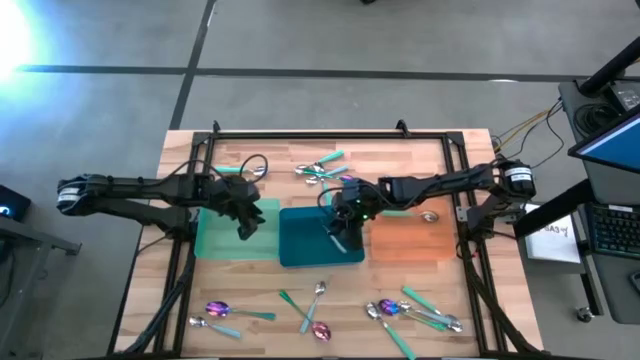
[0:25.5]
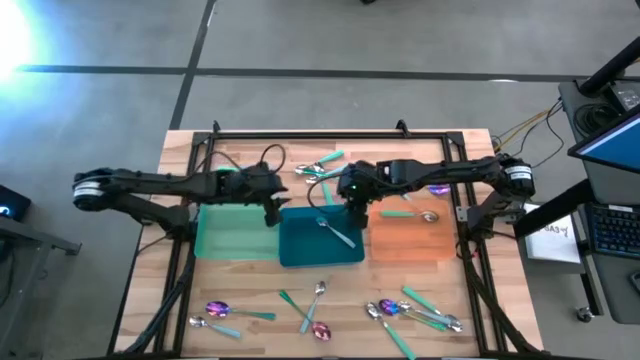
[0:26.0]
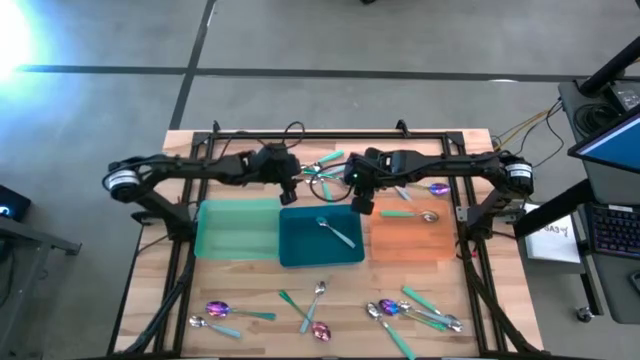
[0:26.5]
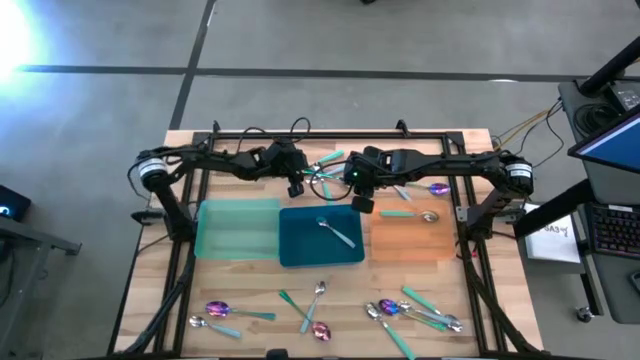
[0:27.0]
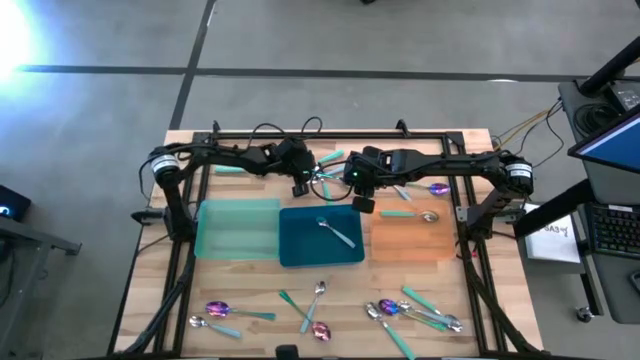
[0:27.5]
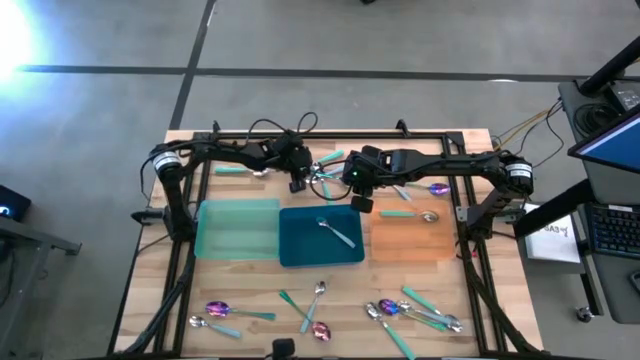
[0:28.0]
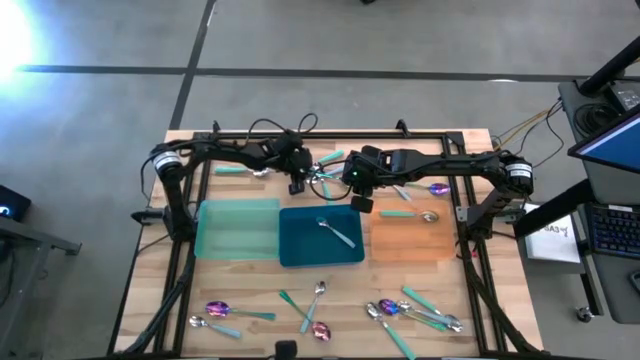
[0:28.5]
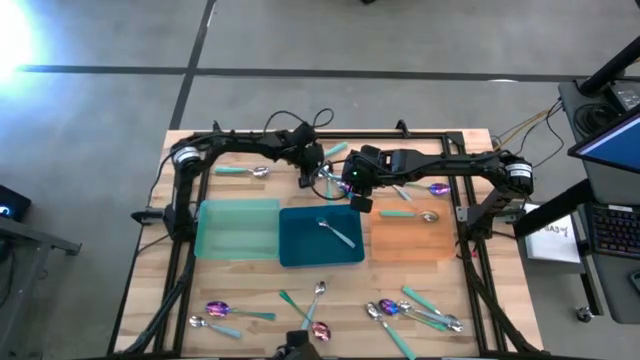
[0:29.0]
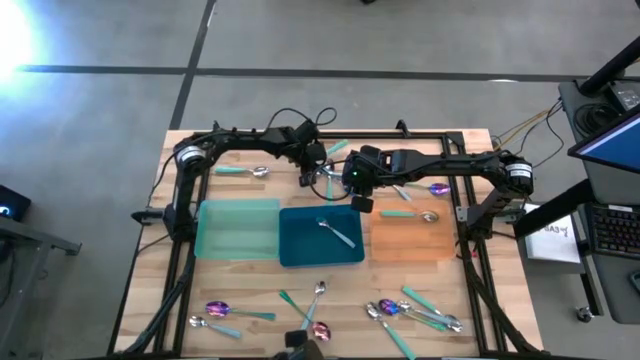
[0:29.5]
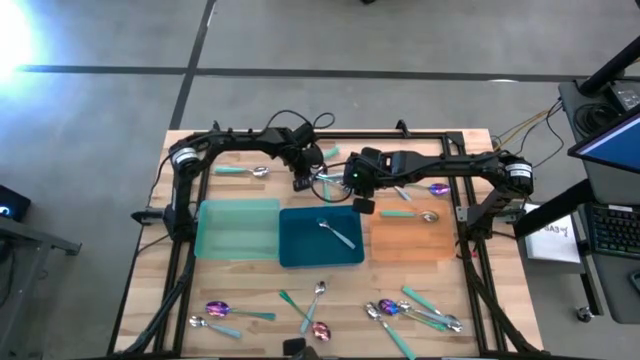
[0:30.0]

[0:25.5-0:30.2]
Task: Sort silverware by color (type)
Put the violet spoon into the green bin

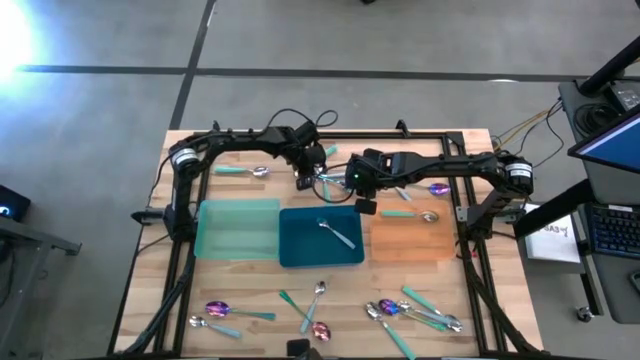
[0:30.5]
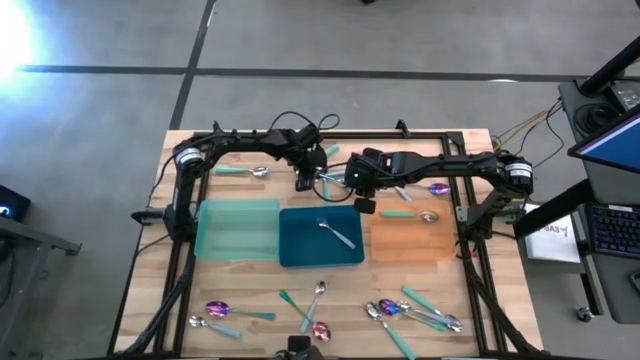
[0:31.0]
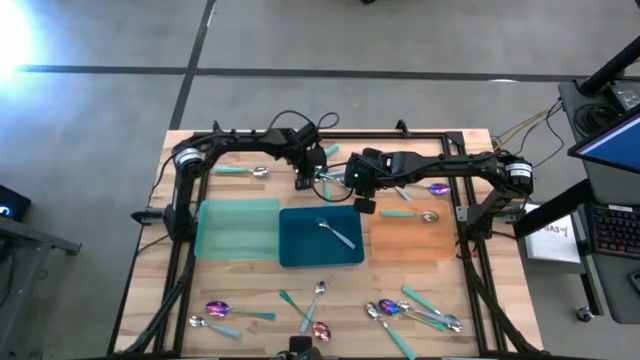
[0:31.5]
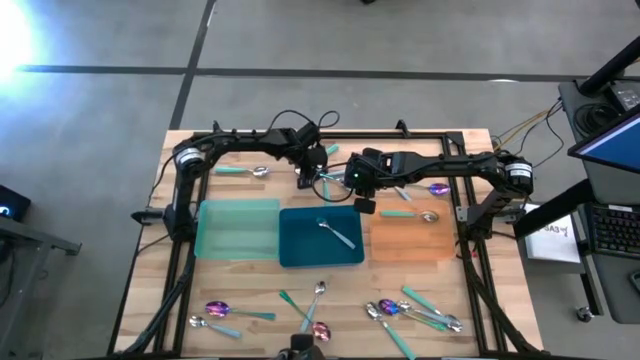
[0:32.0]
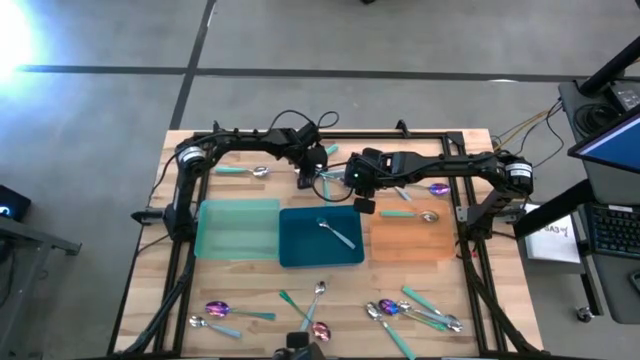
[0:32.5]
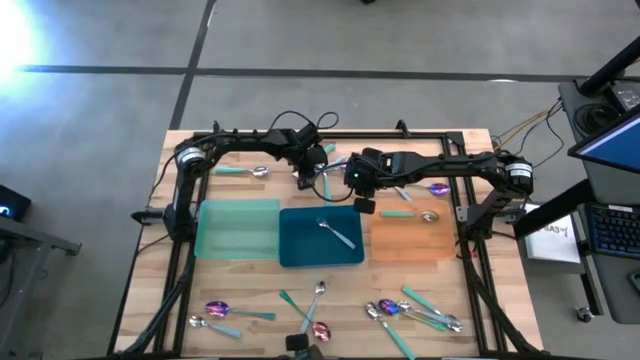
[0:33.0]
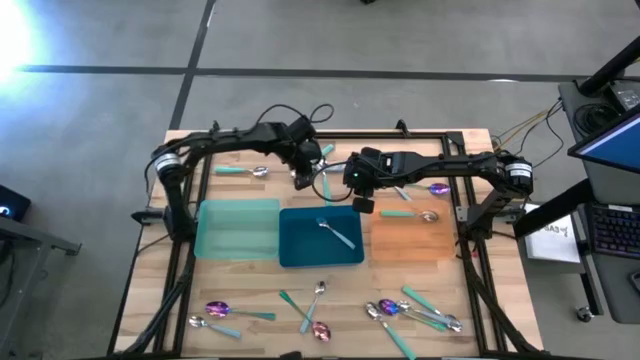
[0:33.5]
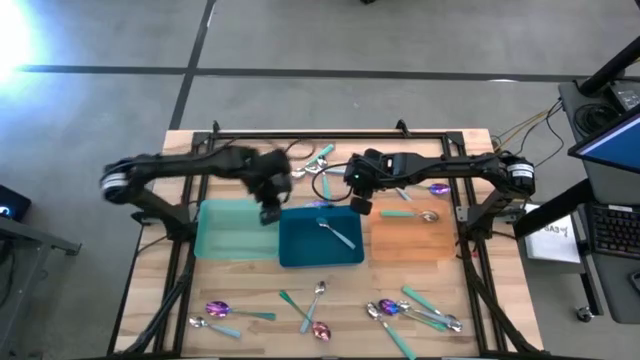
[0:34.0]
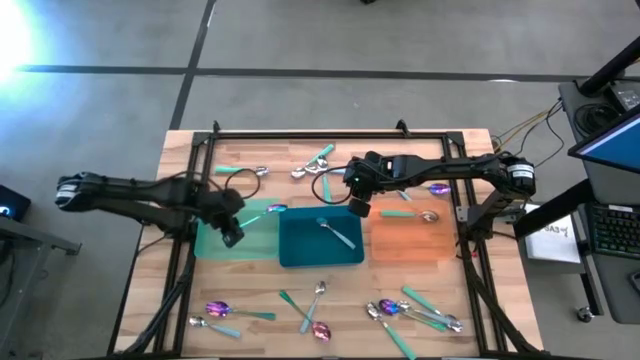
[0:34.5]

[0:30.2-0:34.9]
Put the violet spoon into the green bin

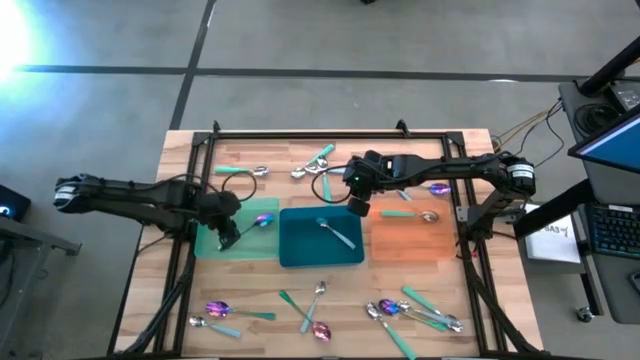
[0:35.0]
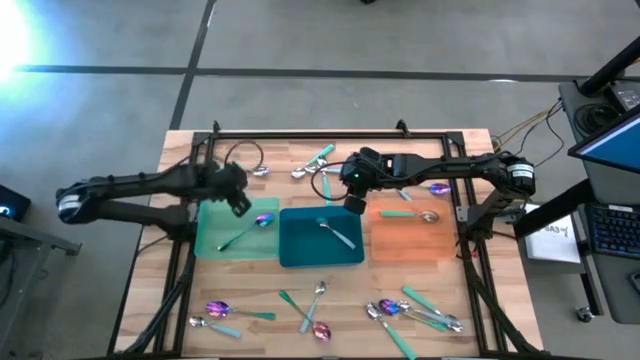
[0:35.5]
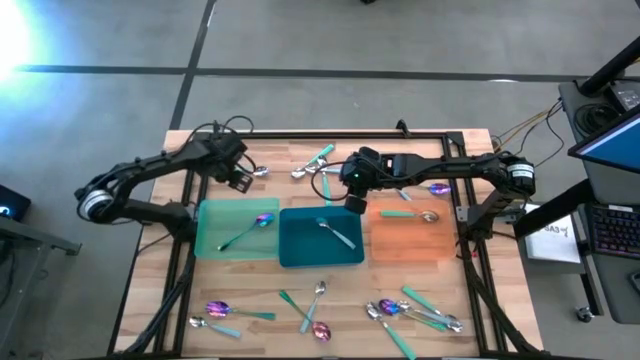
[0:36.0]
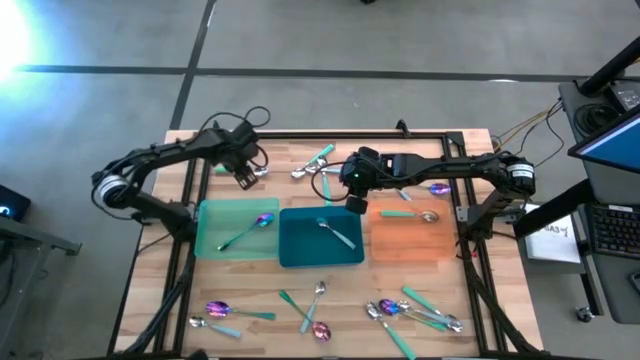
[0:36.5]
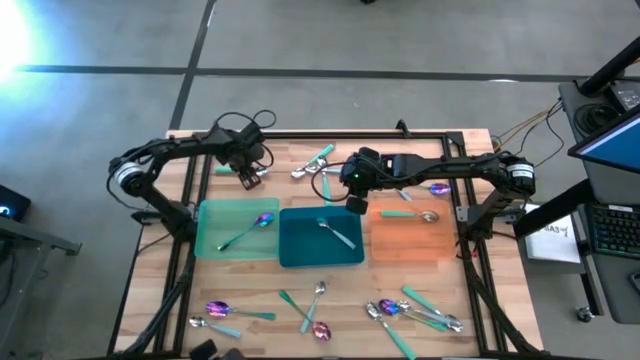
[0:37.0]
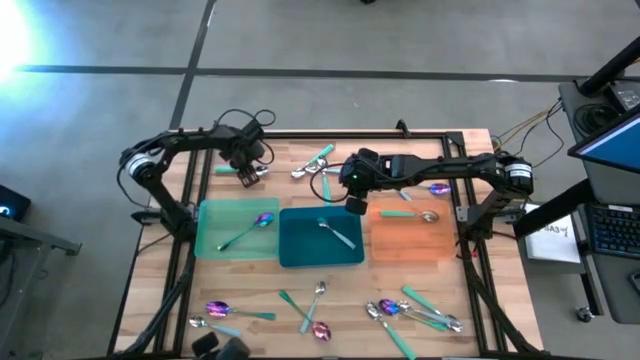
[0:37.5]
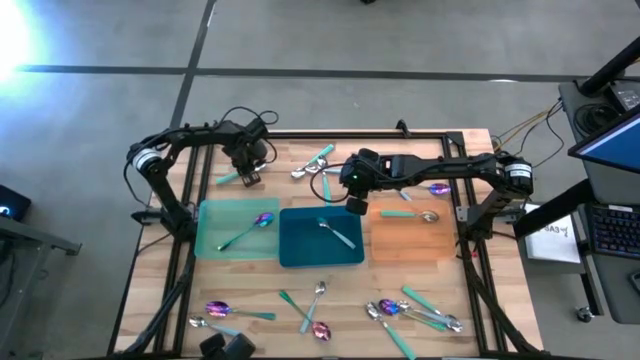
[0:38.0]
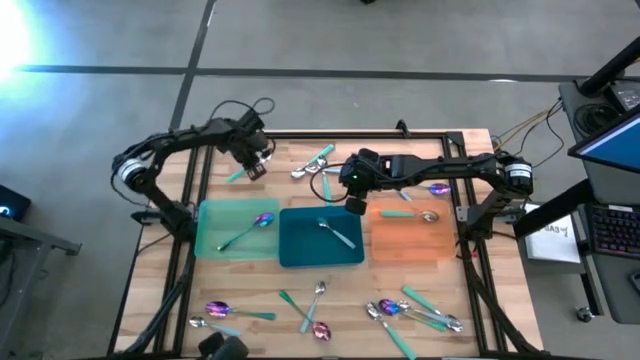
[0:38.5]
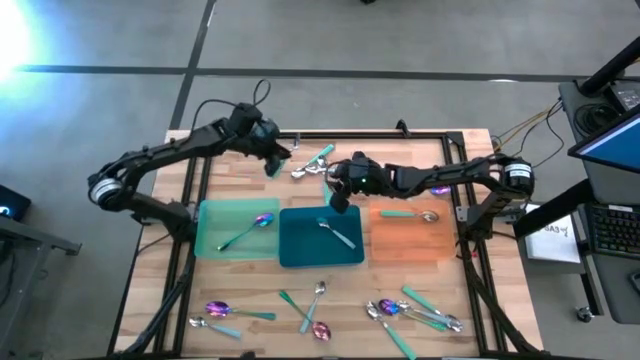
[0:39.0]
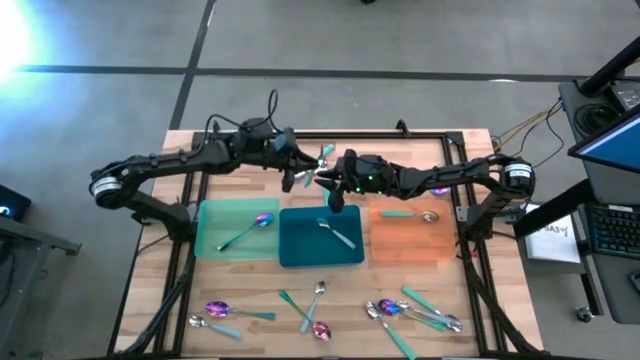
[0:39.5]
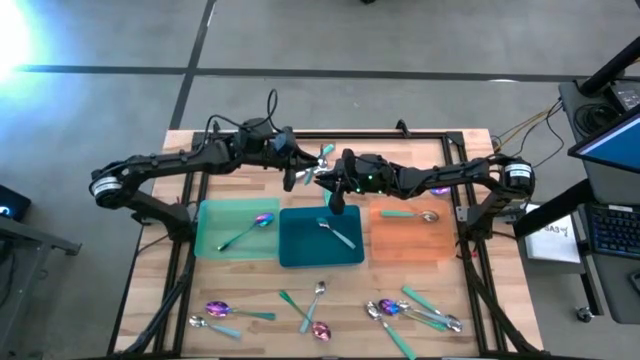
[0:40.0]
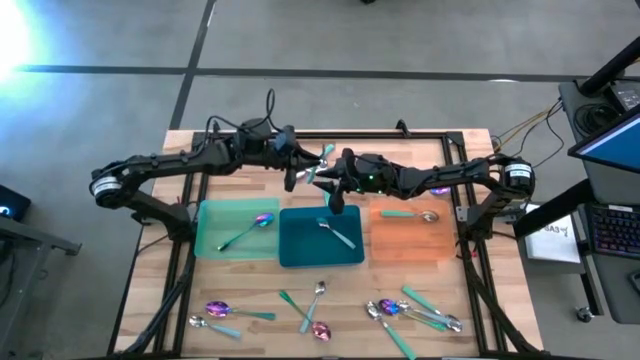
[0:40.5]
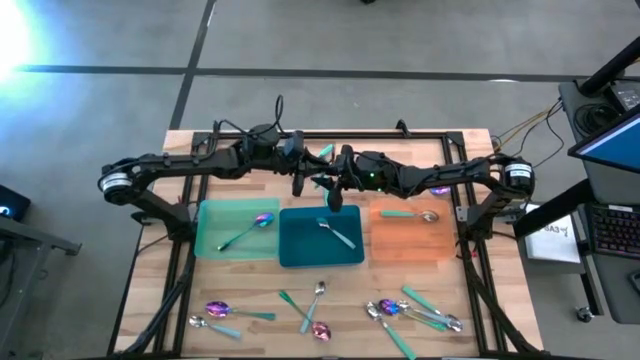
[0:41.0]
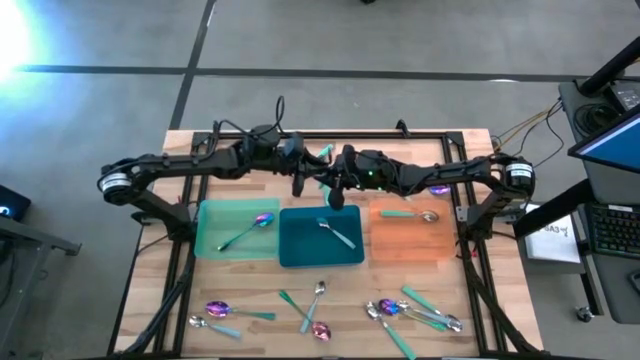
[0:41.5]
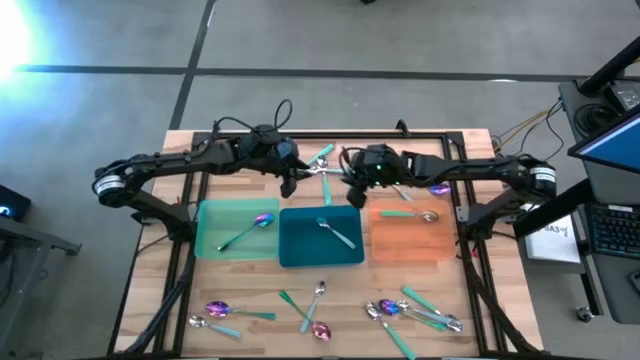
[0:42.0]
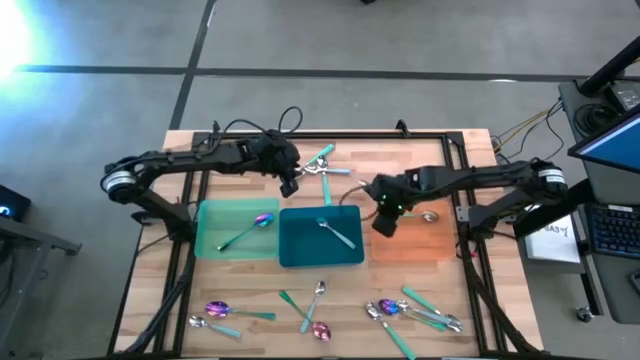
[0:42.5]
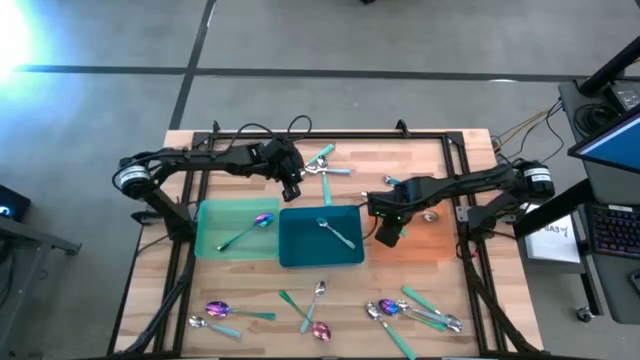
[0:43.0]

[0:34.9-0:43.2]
Put the green spoon into the orange bin

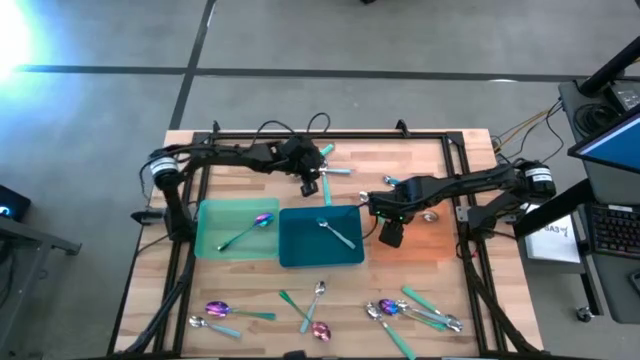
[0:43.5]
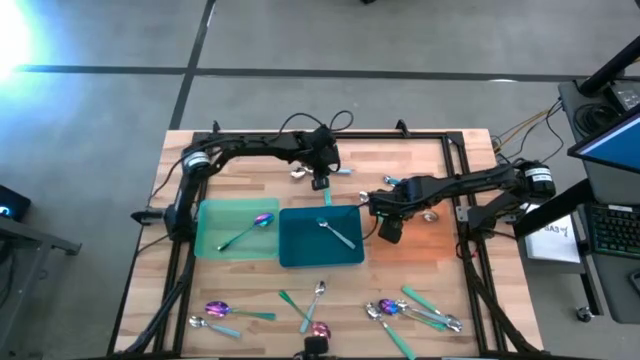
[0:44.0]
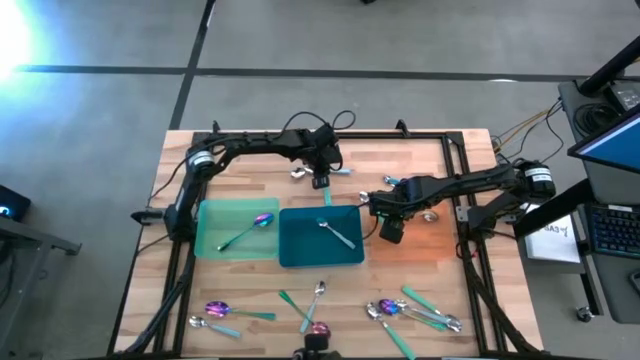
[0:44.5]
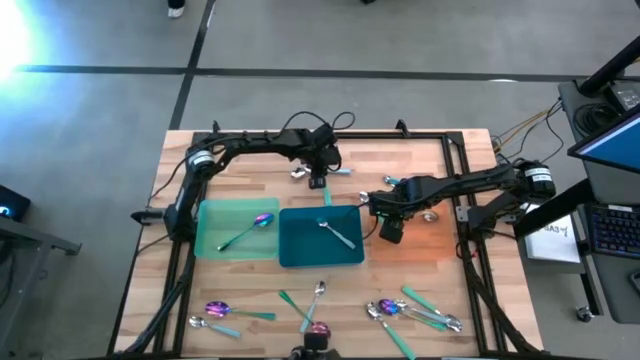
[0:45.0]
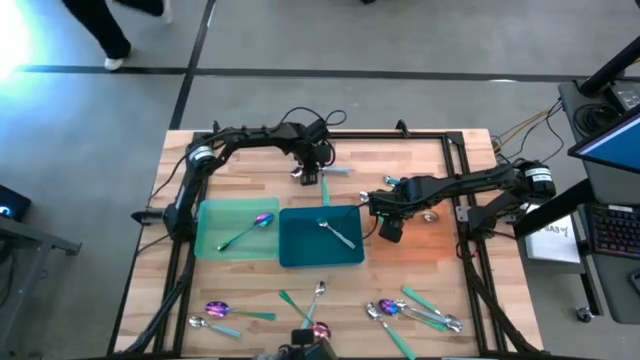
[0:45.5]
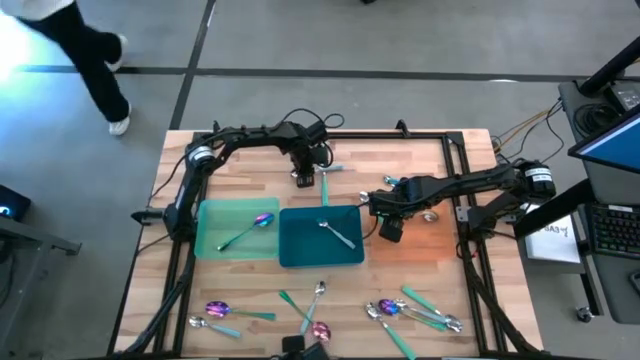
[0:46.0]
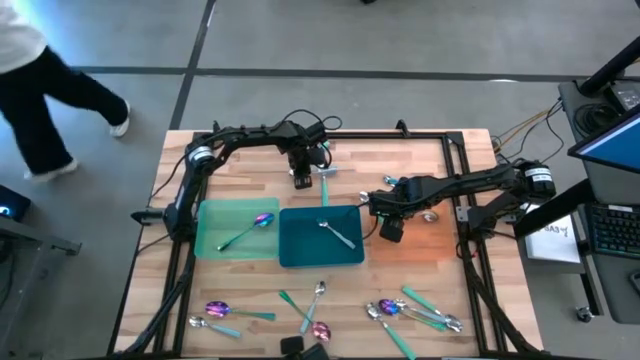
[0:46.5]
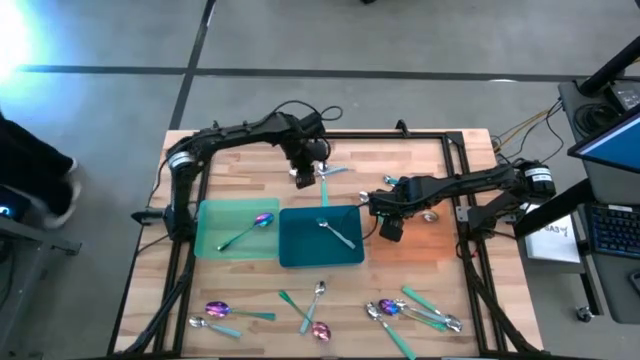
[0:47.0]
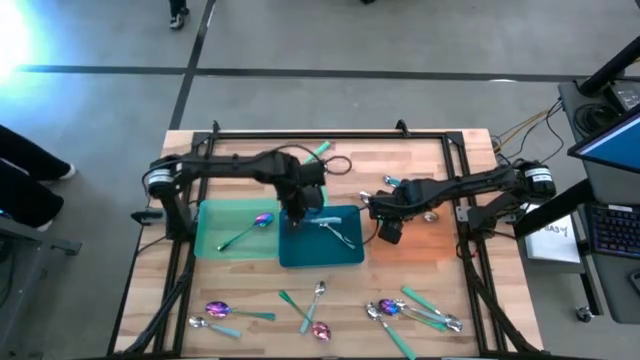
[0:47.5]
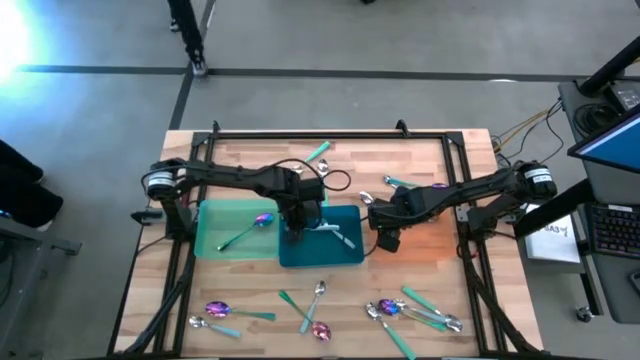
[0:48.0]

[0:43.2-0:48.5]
Put the blue spoon into the blue bin
